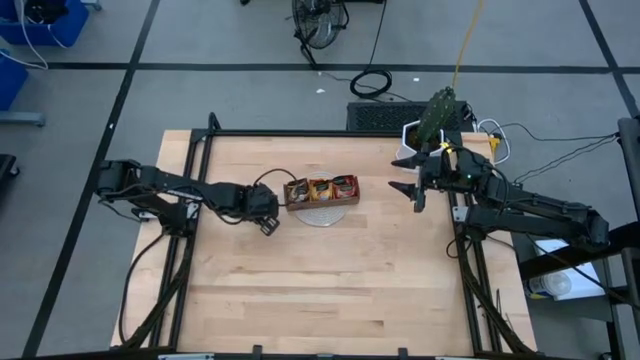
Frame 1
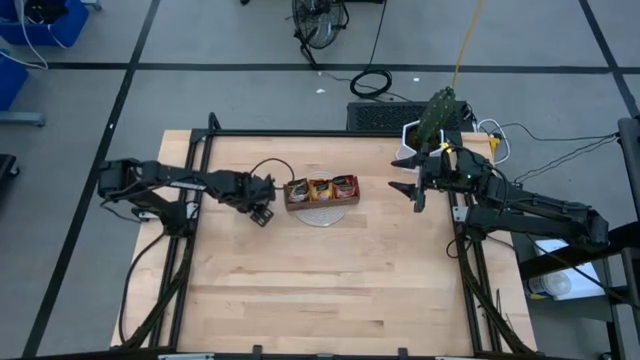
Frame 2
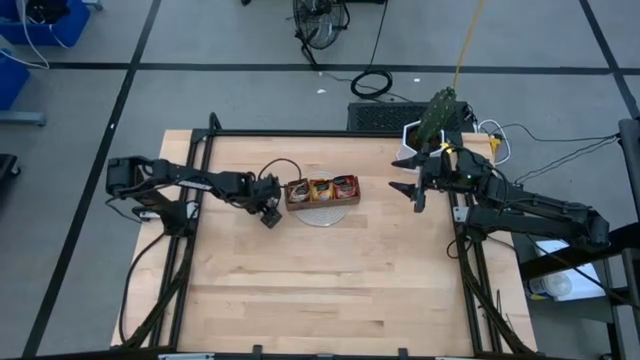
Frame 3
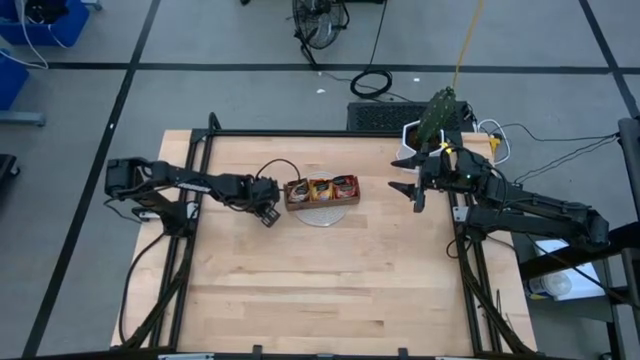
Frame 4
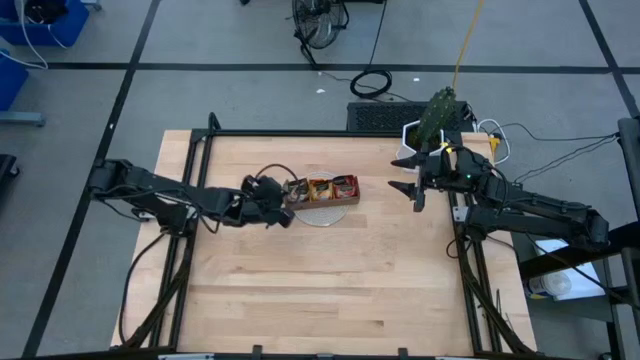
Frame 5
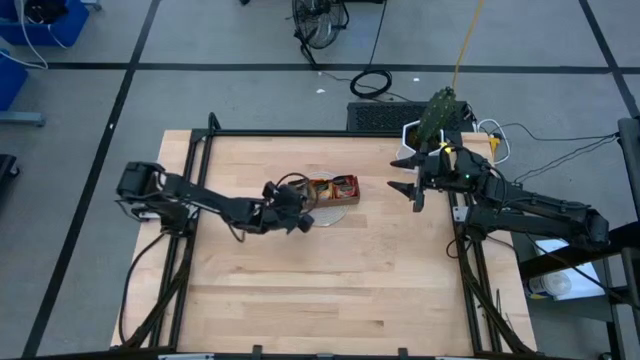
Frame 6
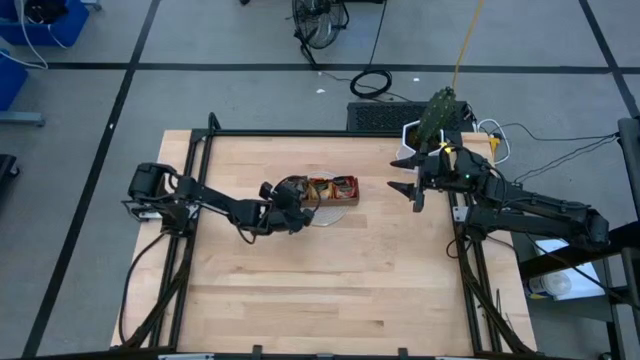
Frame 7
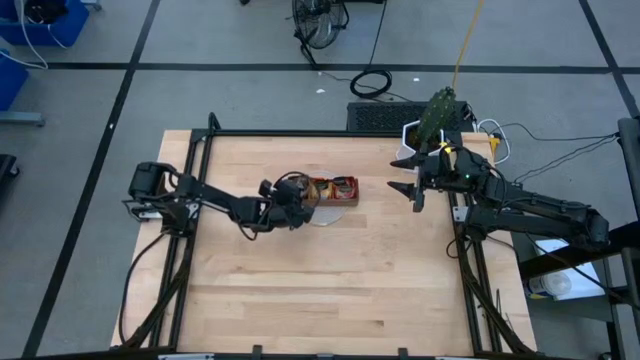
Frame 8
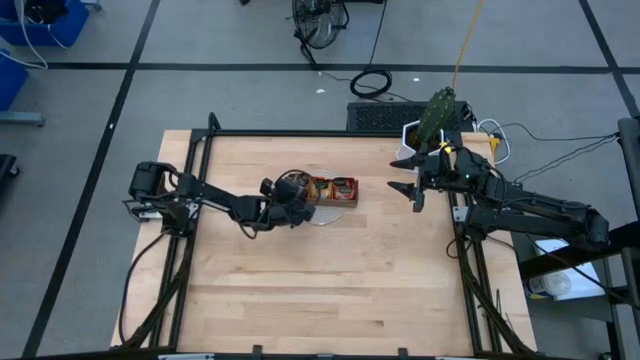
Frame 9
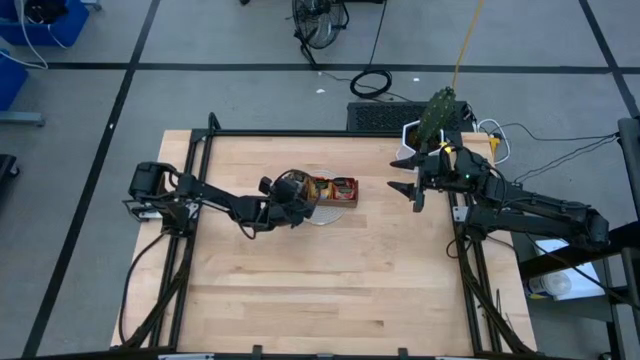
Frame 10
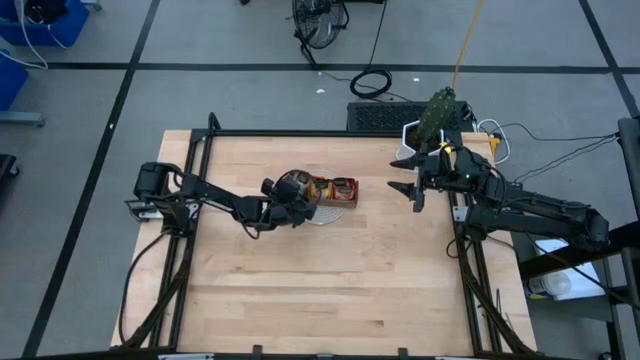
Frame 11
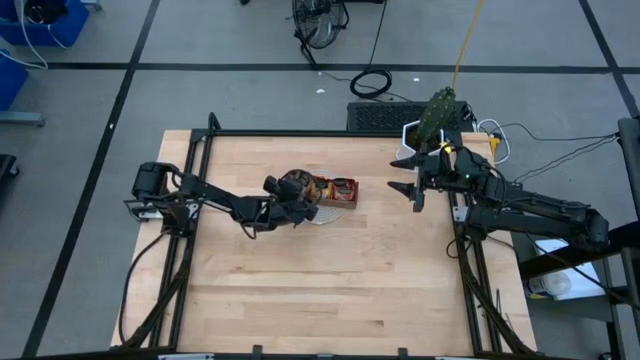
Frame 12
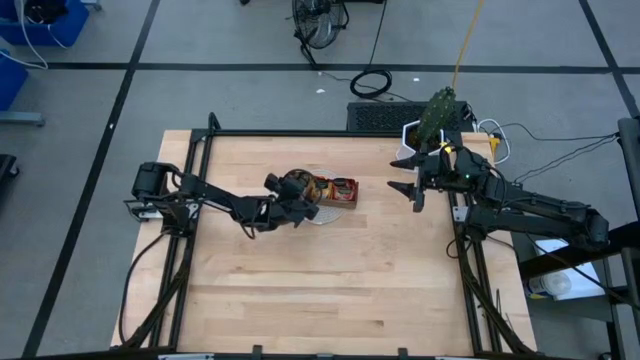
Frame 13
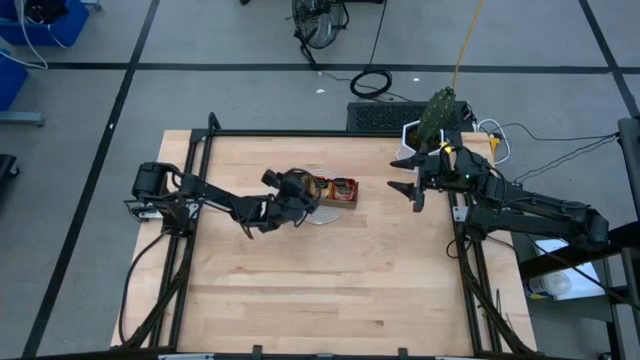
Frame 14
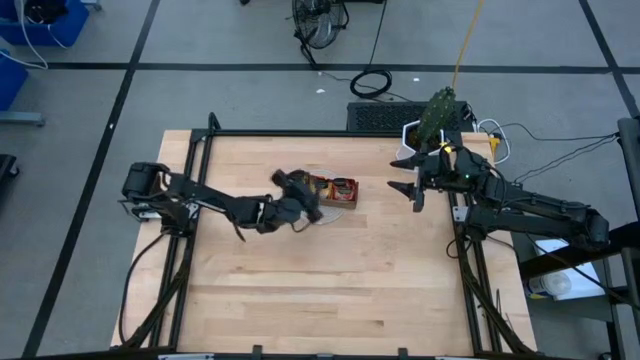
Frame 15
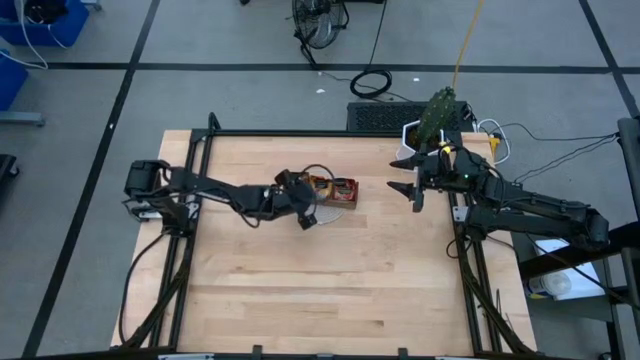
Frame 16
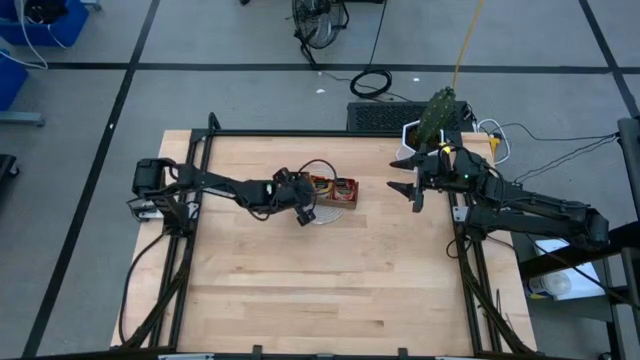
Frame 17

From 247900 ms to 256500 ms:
Task: Pick & Place Tea
Put the tan gold tea bag into the left section of the wood organizer

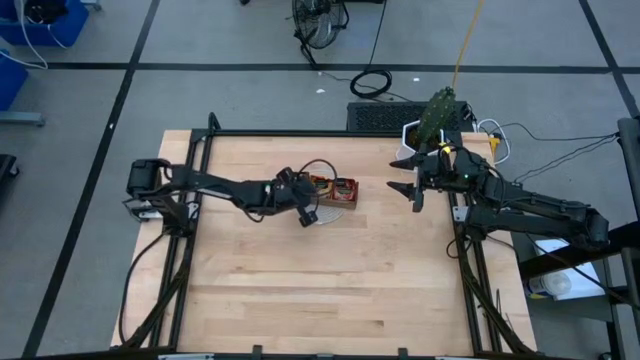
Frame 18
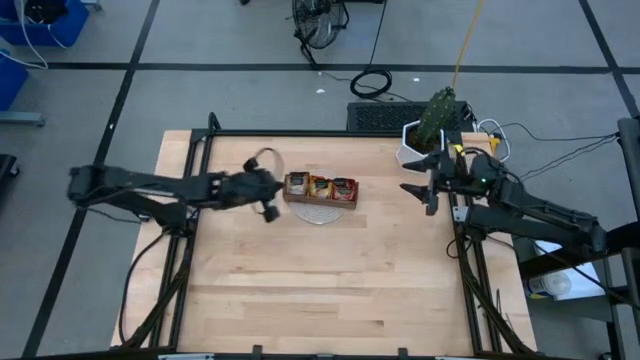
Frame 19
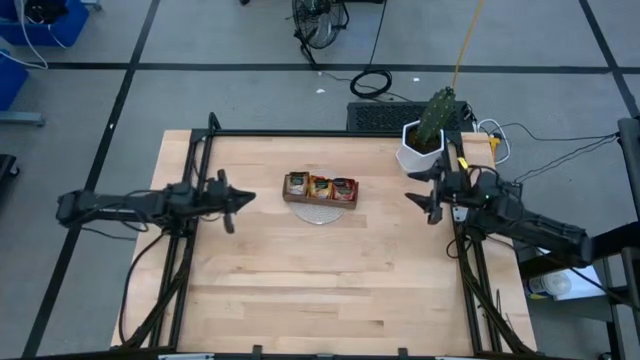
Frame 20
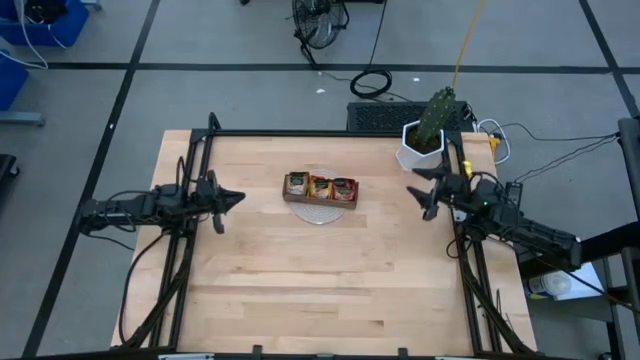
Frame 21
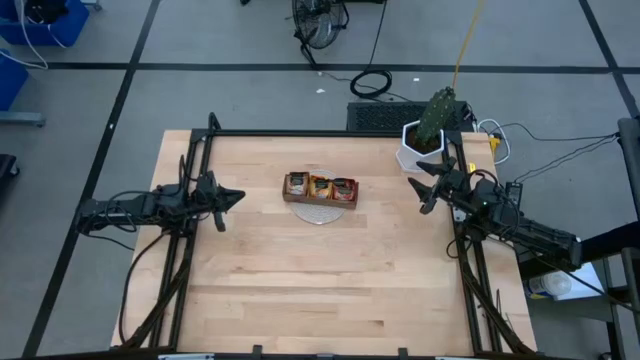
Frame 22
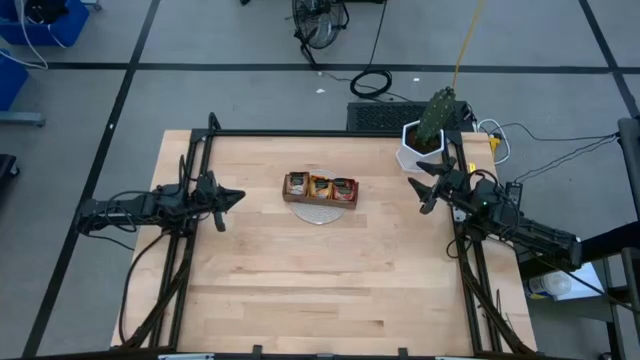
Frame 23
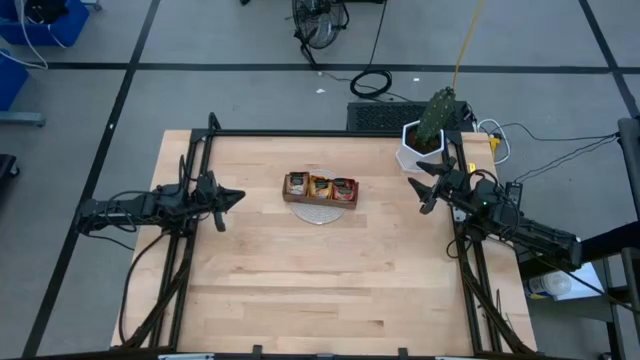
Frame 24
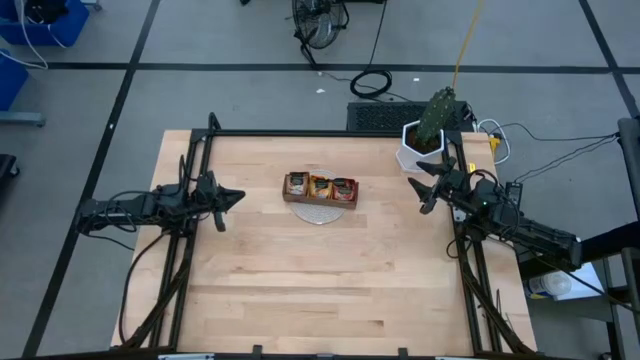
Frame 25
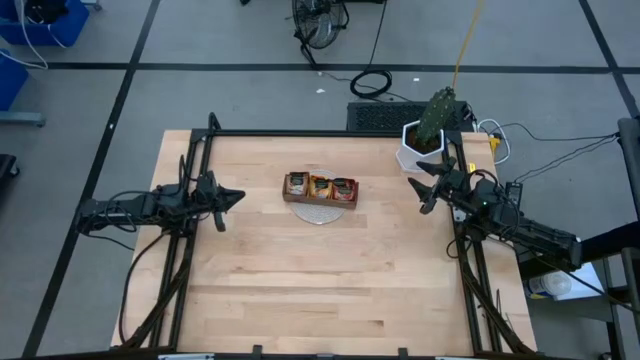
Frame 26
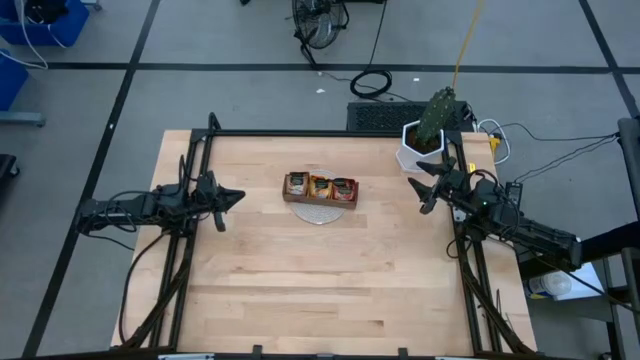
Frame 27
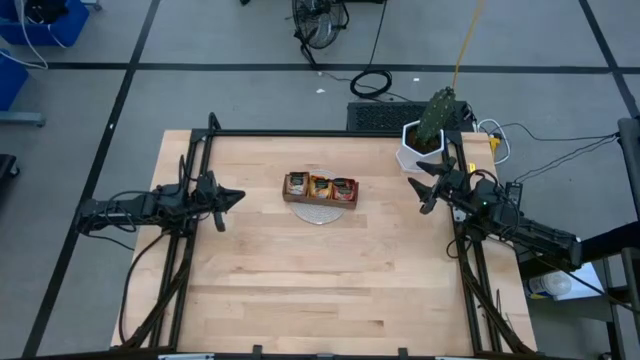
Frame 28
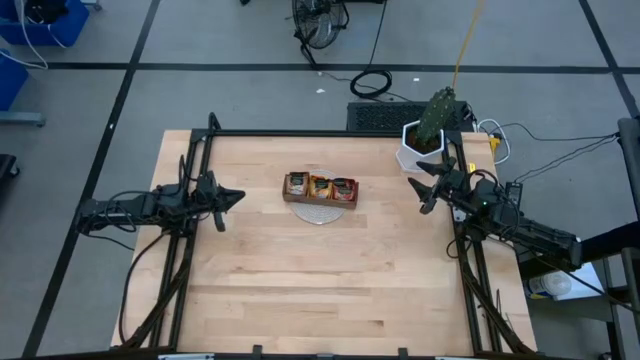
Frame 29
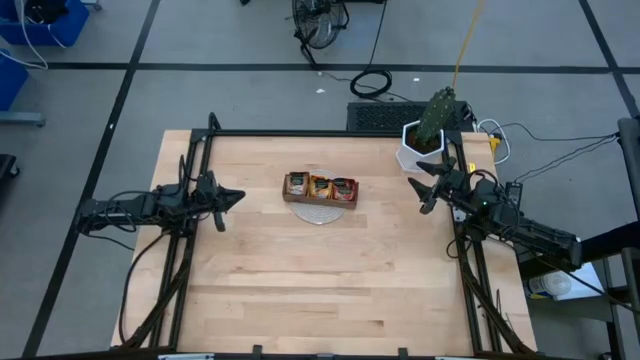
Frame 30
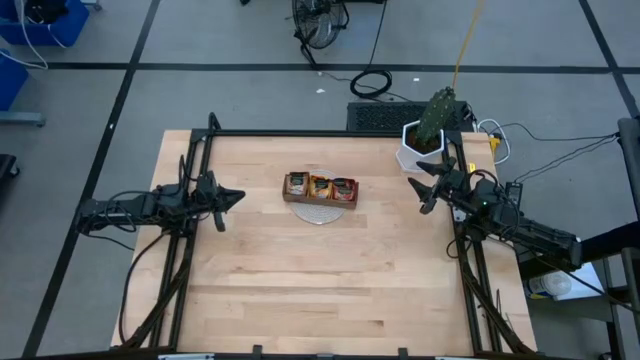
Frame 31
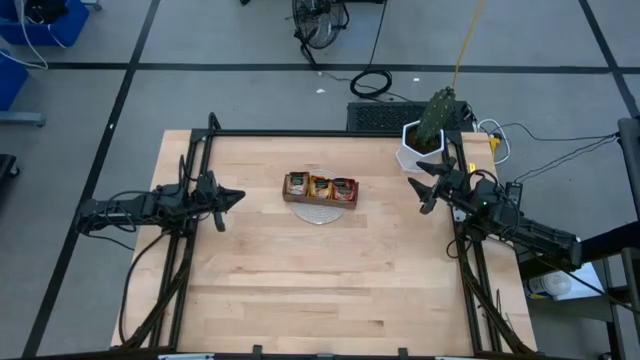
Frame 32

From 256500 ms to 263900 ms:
Return to Home Position

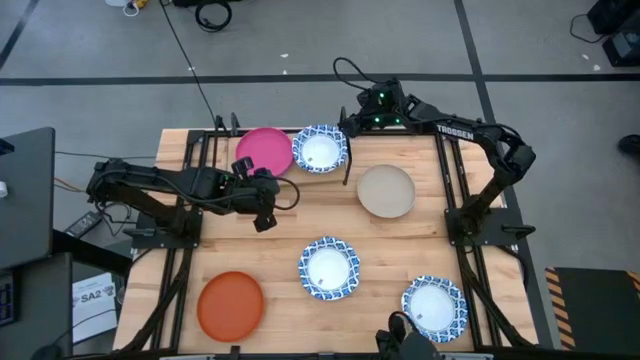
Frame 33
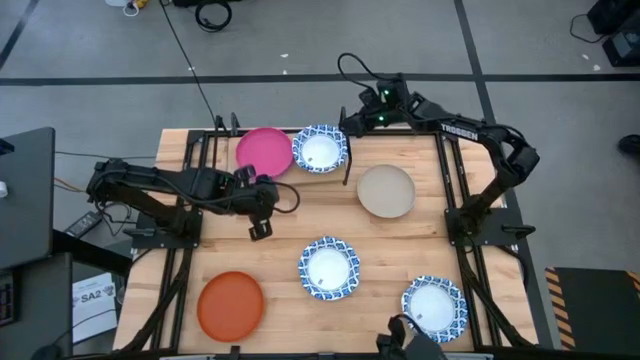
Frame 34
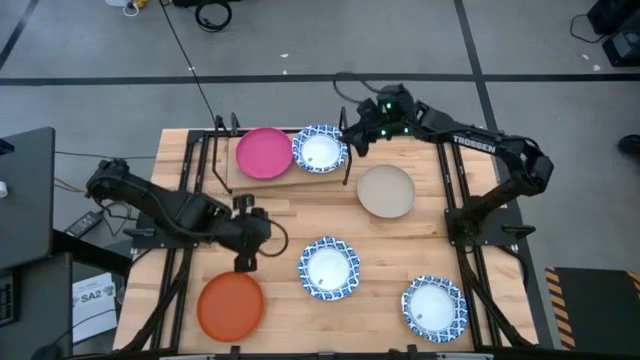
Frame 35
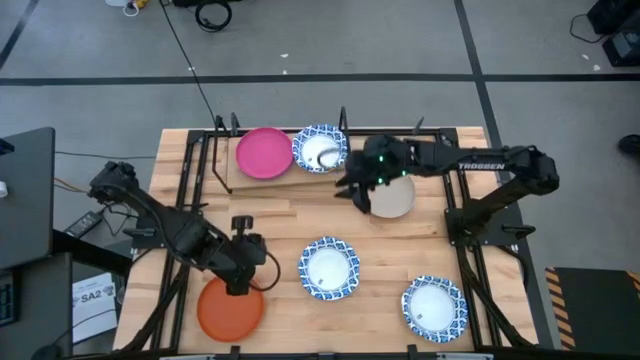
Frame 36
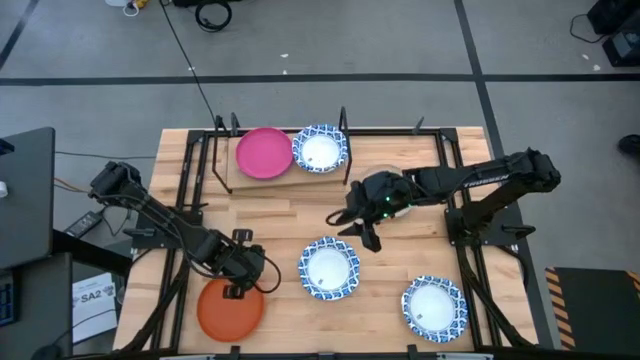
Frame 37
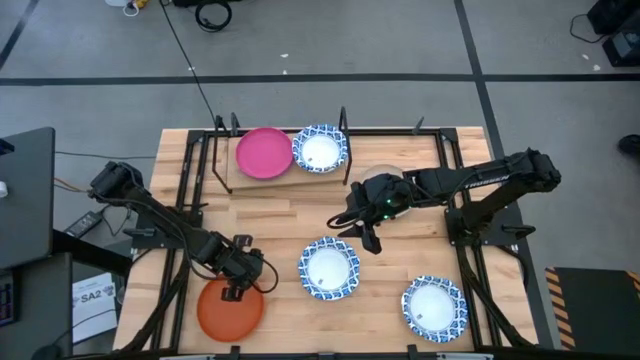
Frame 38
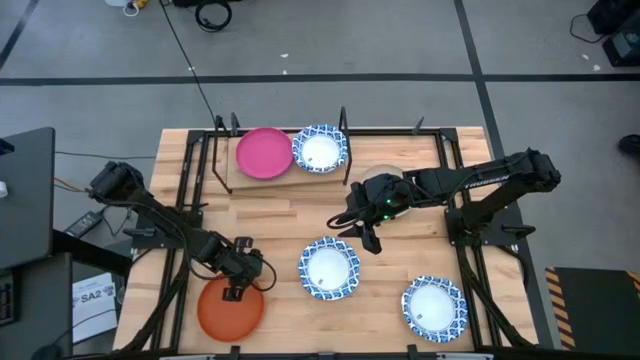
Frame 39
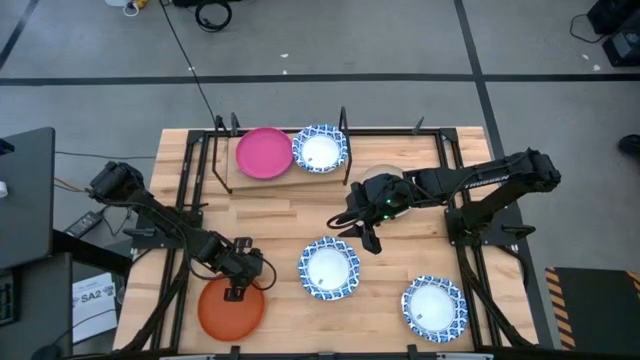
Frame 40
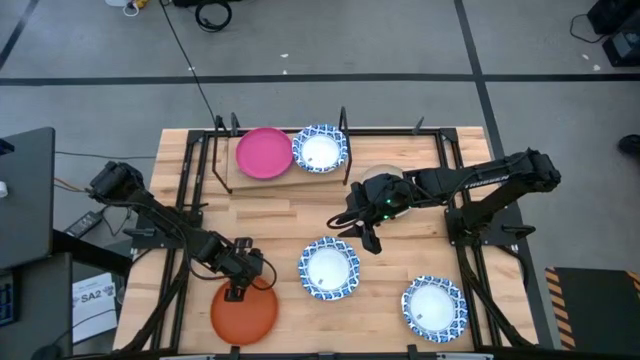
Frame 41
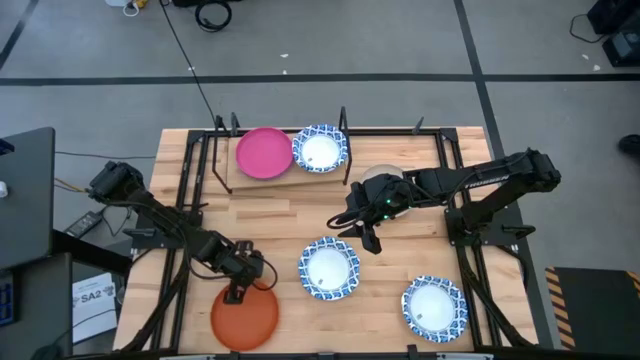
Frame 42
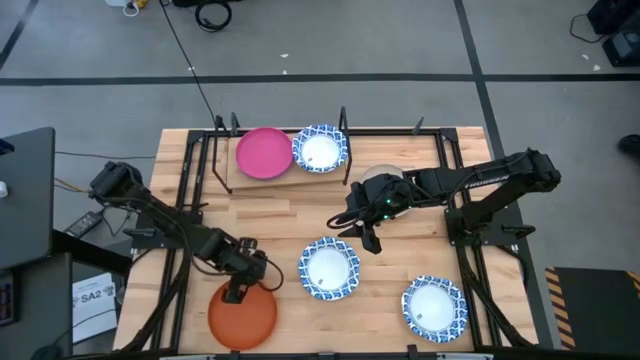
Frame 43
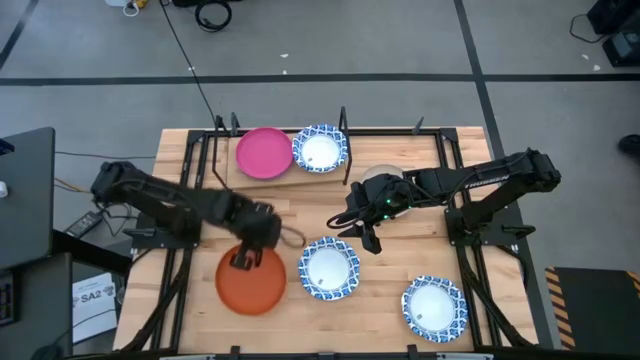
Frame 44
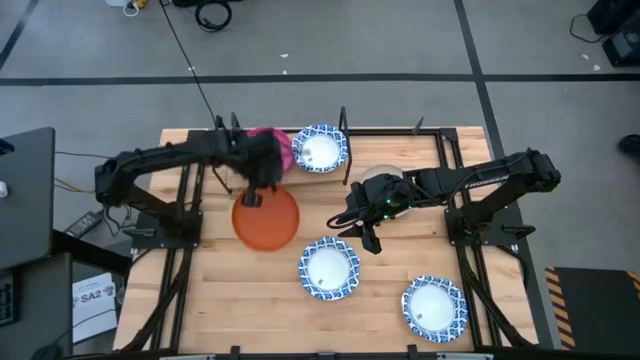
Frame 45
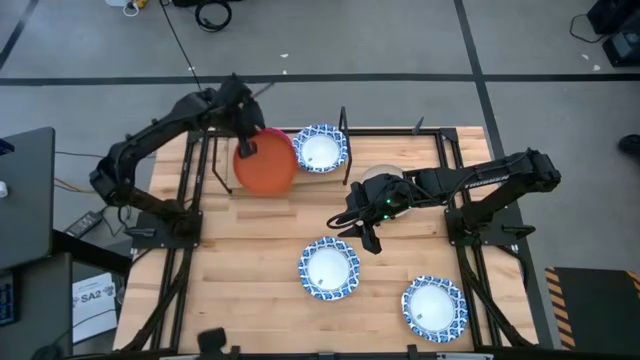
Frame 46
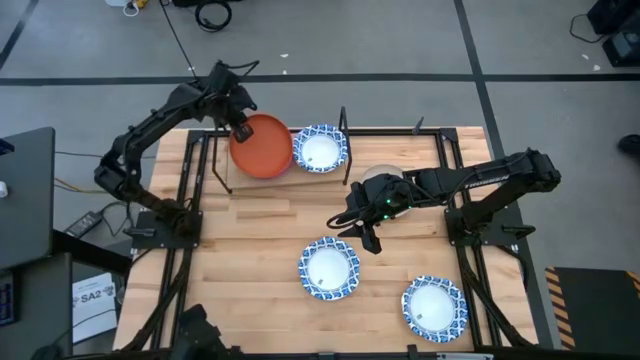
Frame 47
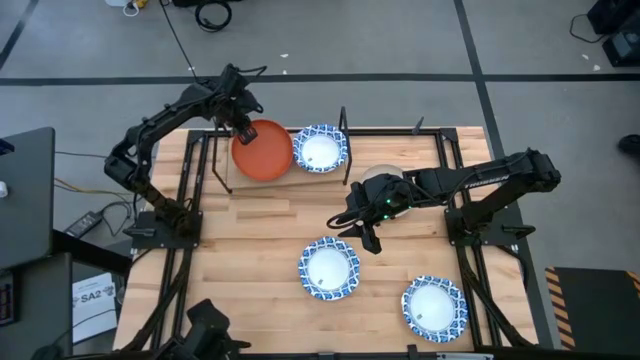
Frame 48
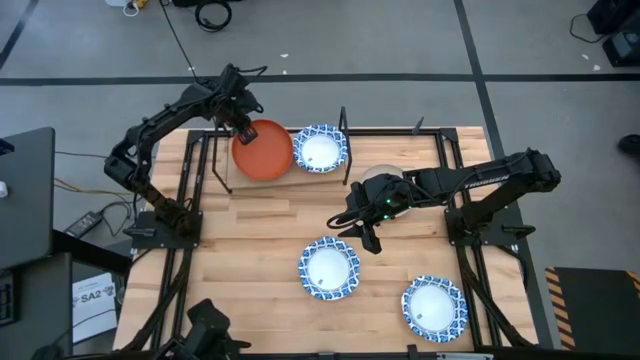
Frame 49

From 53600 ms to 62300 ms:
Task: Place and stack plates onto a shelf
Stack the orange plate on top of the pink plate on the shelf
